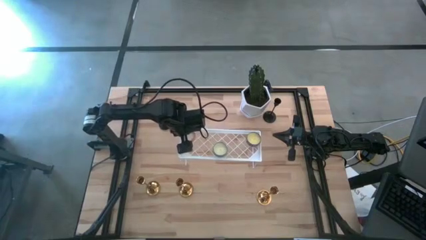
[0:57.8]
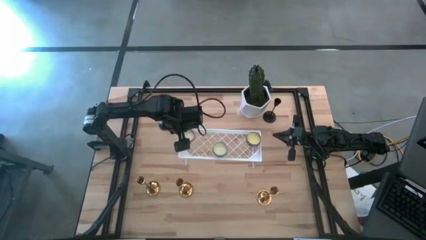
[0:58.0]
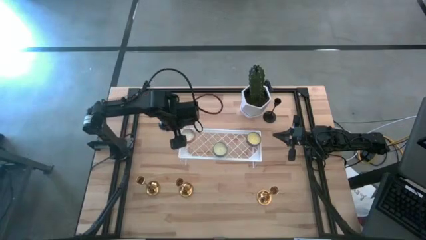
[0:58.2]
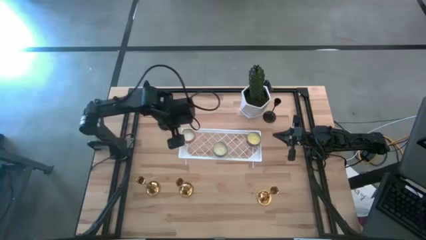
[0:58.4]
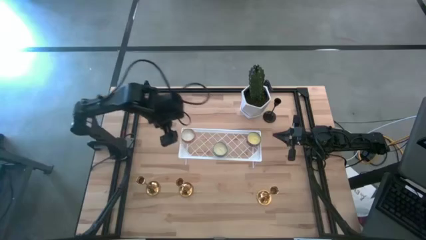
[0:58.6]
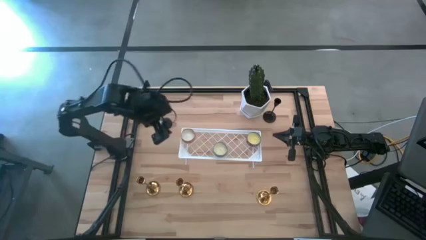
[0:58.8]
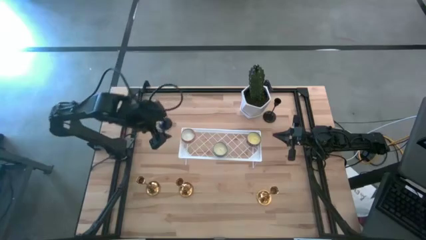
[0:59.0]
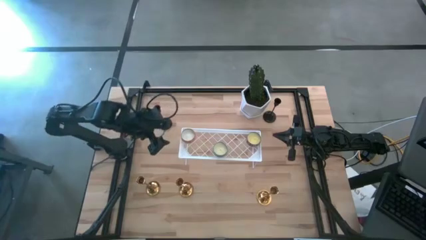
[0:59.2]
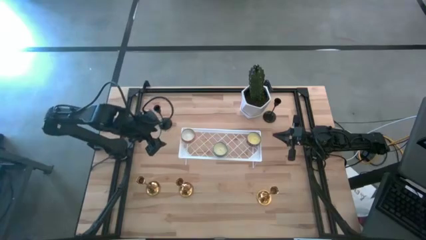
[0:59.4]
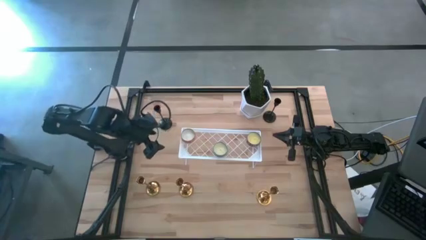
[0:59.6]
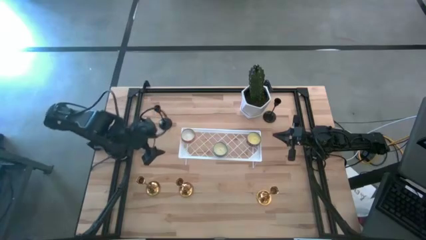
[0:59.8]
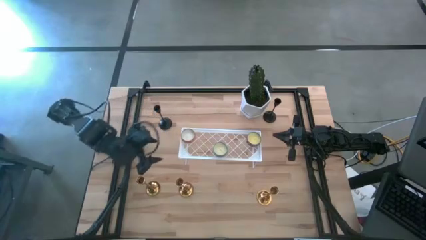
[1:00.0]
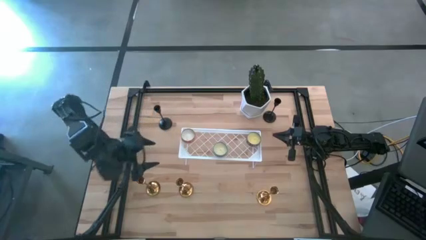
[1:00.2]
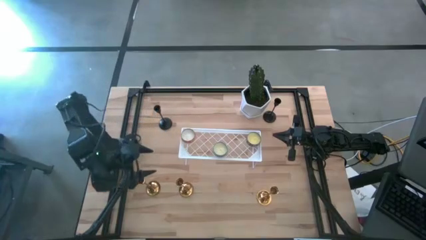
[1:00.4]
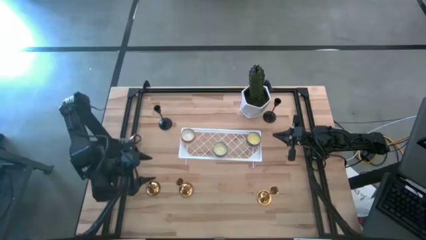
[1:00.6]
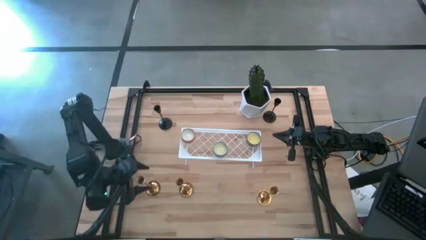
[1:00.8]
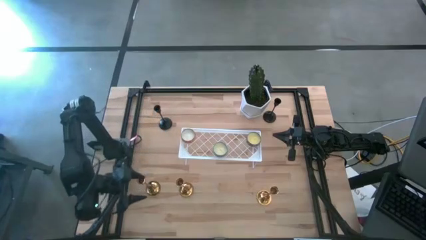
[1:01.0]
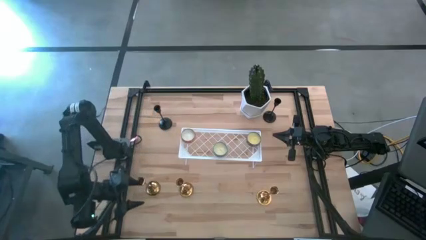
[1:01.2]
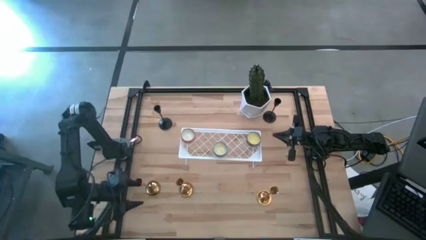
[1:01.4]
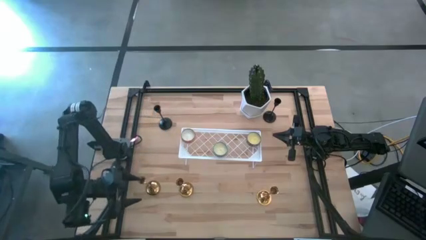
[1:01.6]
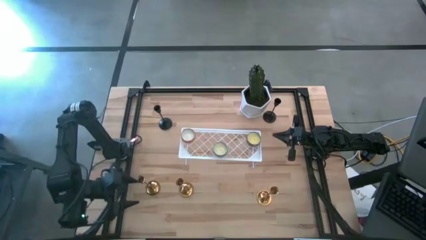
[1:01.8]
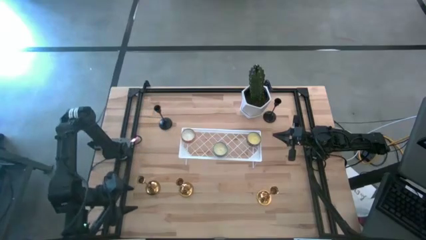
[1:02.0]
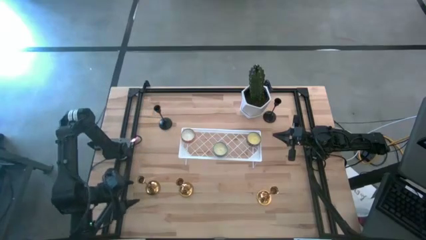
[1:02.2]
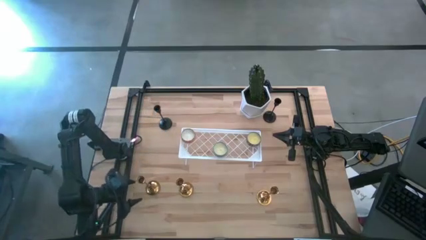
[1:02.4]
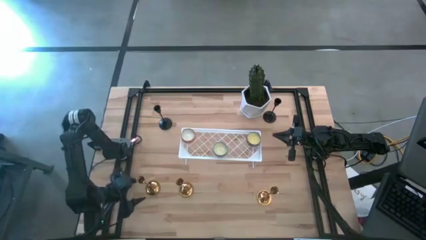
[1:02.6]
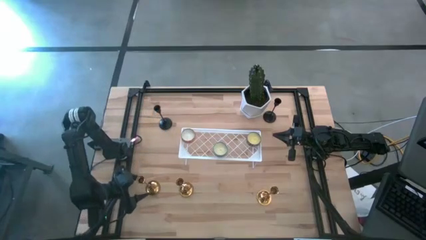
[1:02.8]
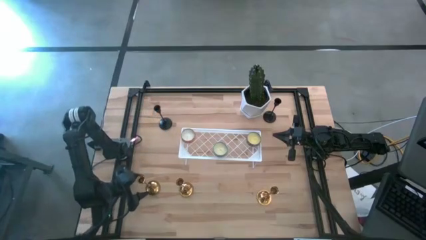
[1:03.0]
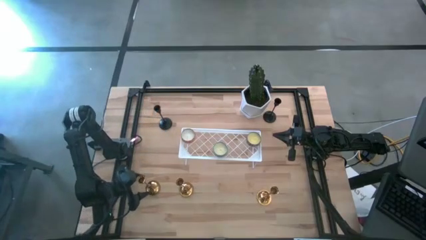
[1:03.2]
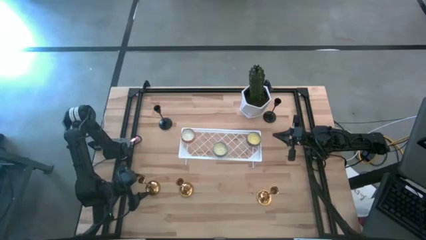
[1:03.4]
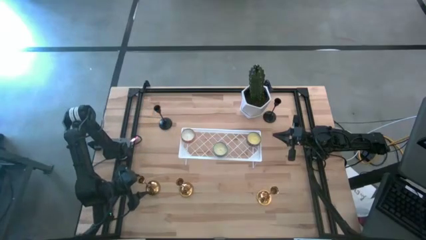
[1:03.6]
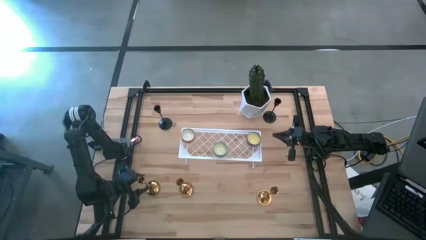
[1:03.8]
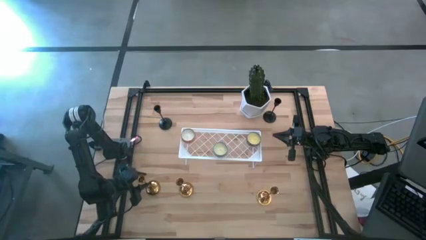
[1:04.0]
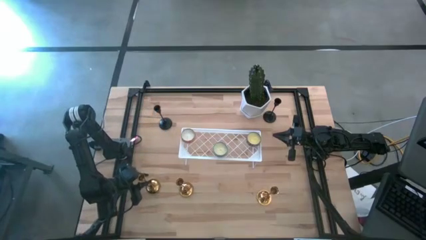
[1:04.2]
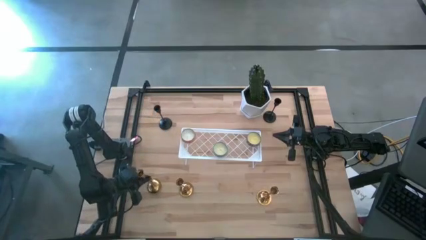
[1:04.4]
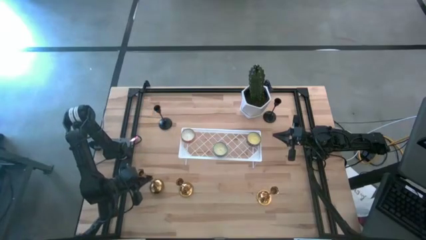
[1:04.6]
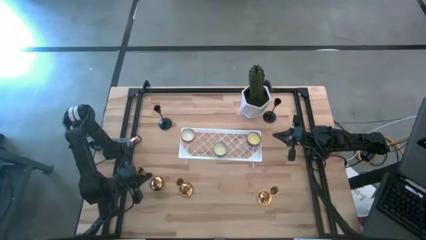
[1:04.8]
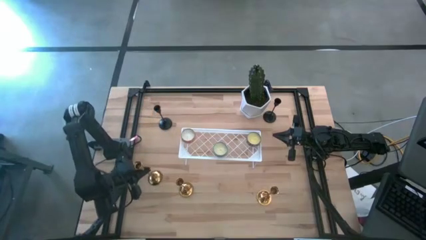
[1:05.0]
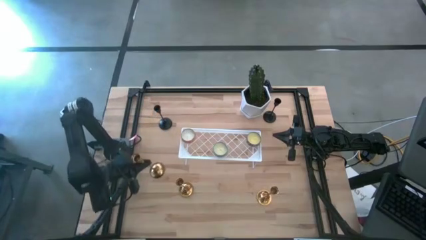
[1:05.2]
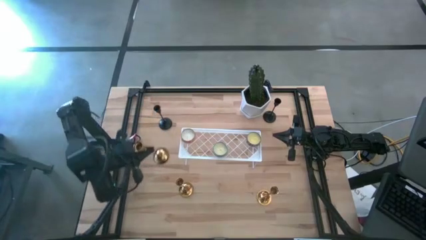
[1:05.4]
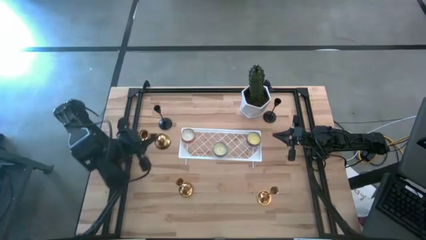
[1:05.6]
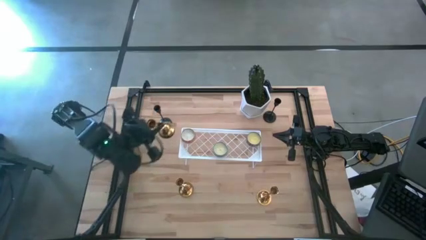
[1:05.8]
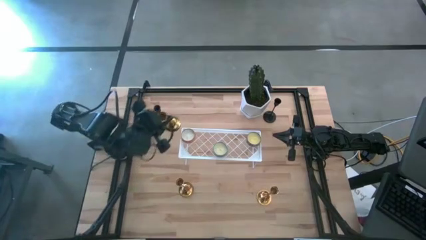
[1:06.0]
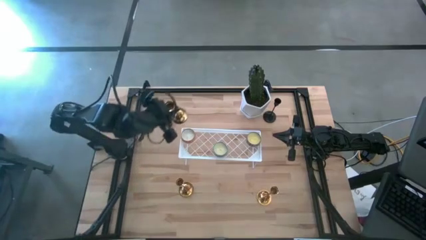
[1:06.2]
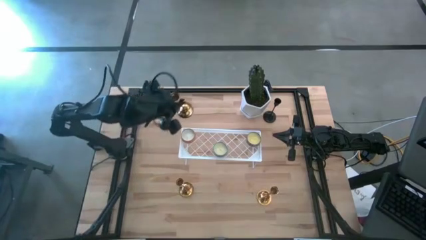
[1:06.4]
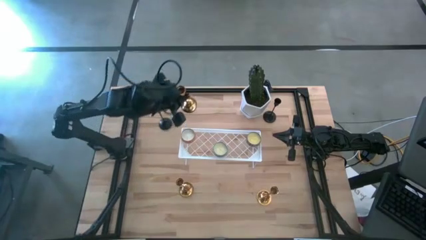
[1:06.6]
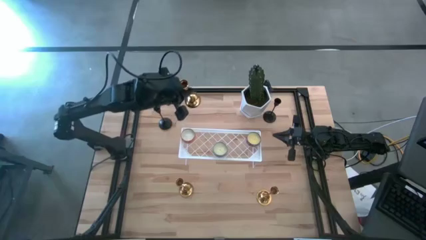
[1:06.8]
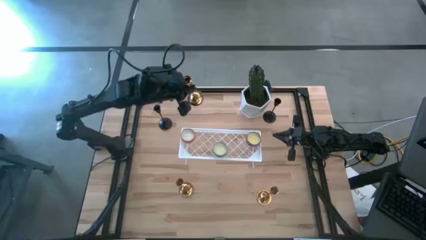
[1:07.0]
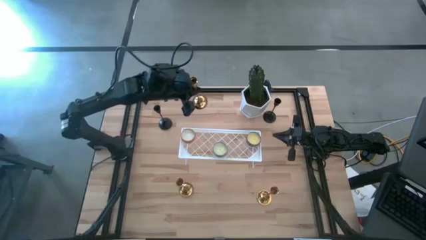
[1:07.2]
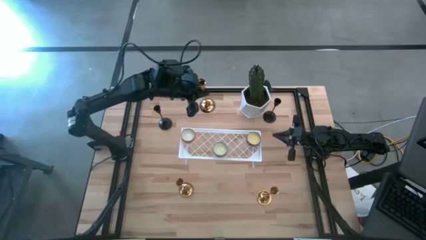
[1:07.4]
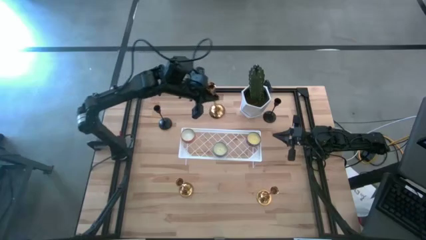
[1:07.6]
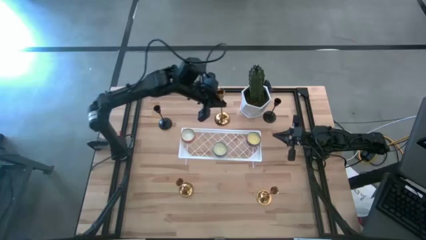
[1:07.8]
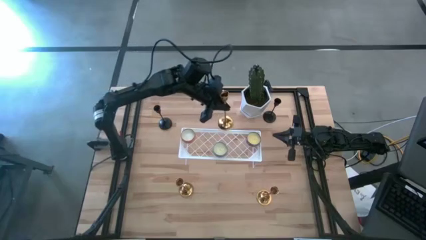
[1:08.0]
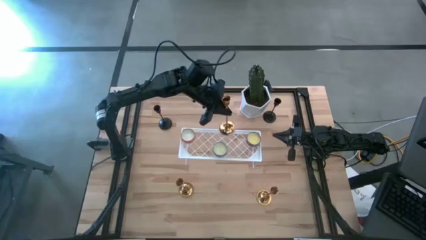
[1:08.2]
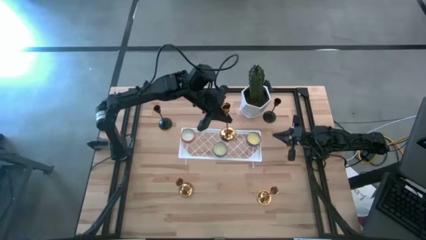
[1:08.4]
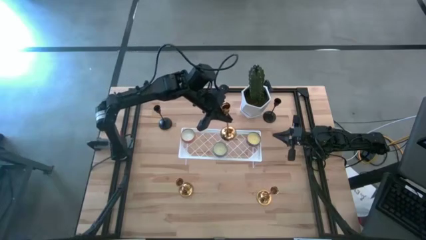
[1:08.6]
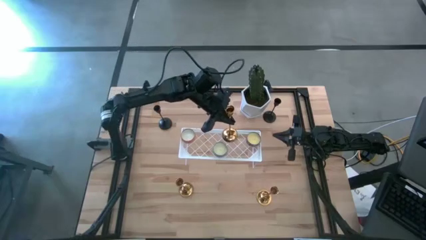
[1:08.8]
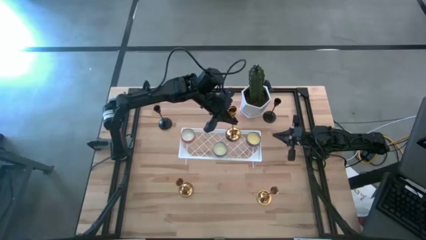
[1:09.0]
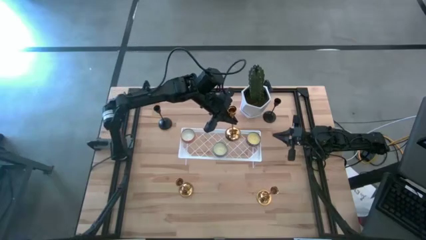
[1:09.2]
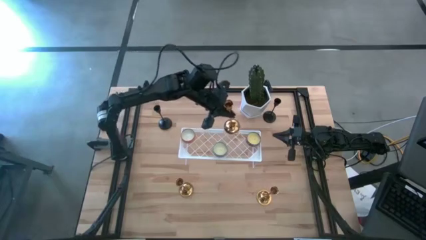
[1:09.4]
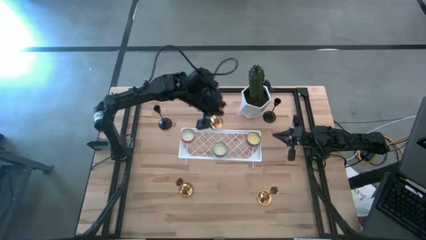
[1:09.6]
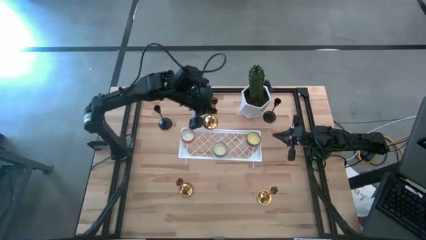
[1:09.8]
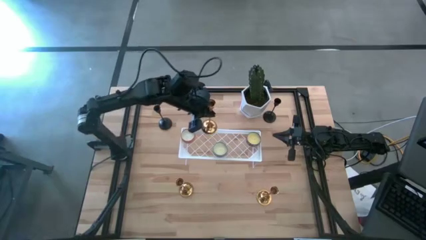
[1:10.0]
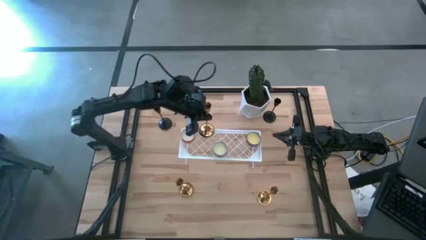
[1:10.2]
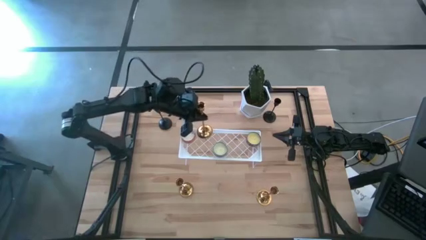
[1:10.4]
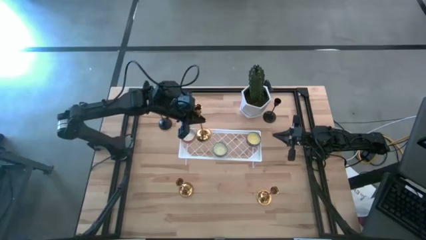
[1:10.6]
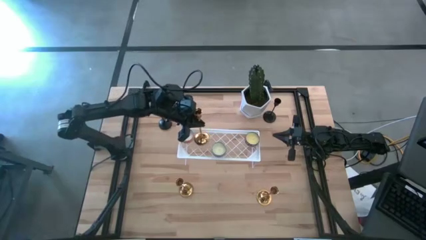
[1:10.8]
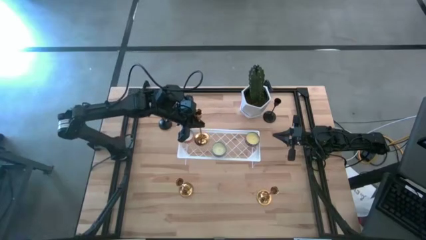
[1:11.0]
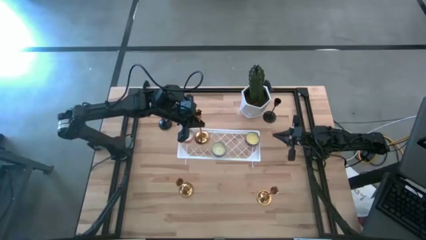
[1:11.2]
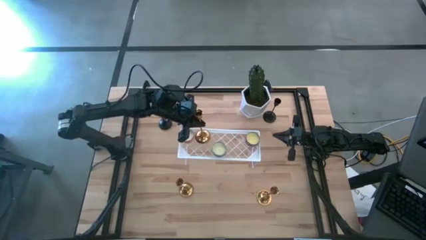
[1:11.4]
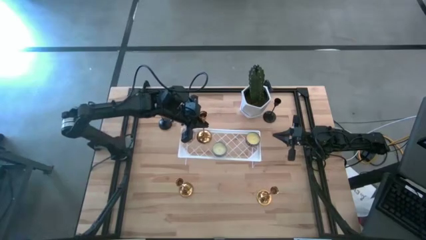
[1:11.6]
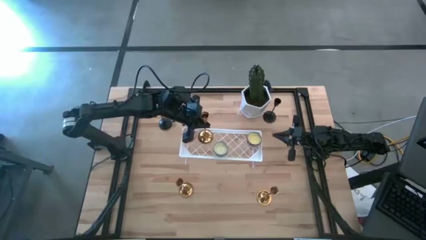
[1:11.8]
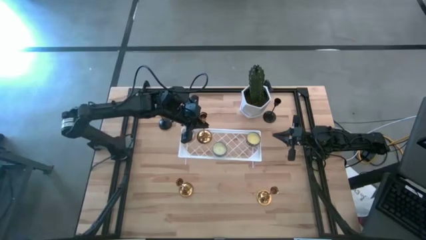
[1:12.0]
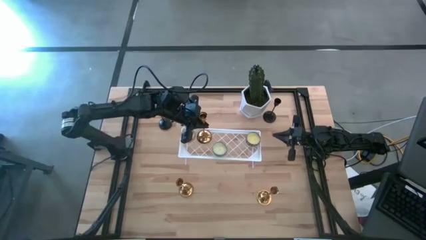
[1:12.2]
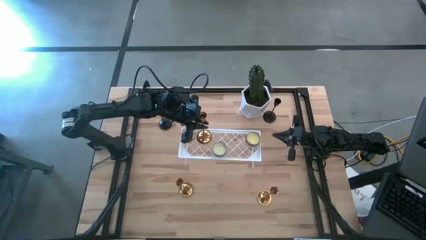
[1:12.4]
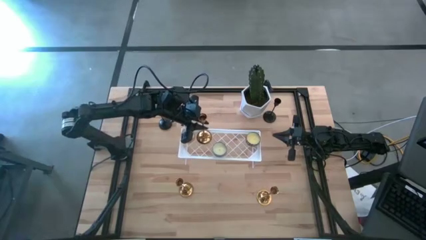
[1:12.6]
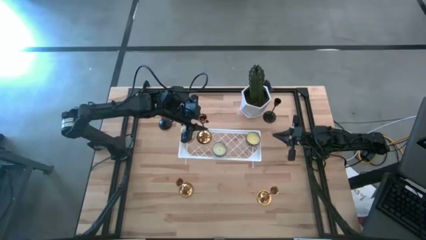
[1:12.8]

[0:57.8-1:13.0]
Task: Pick & Place candle stick holders
Put the left gold candle holder on the shelf
